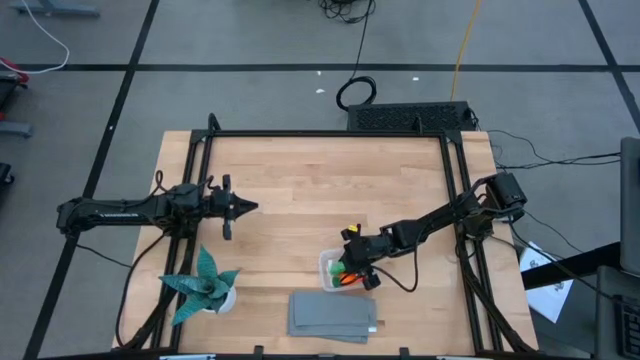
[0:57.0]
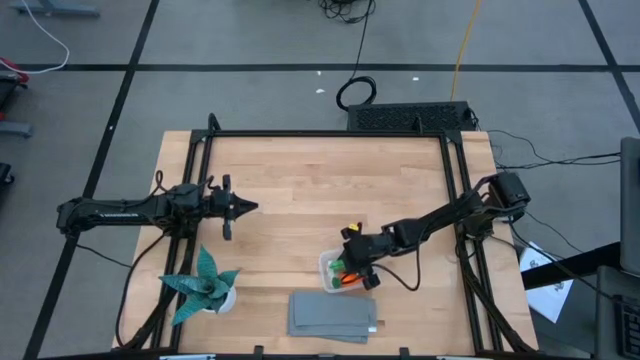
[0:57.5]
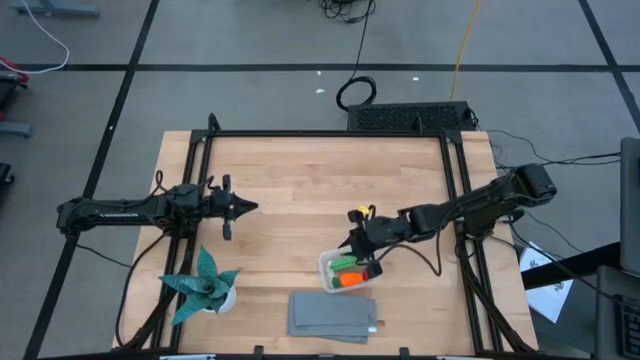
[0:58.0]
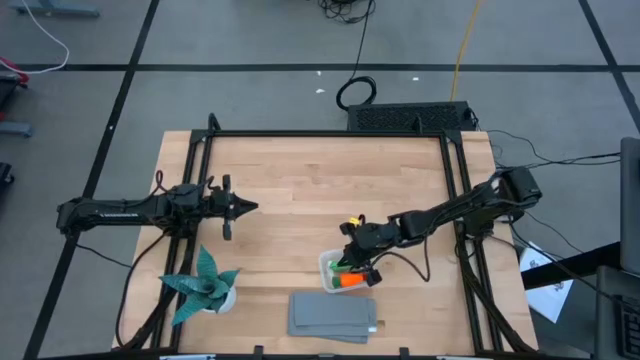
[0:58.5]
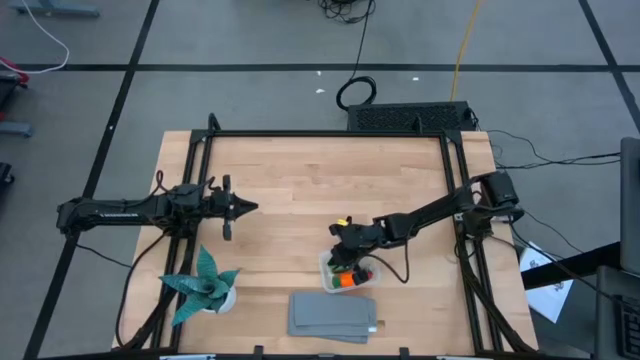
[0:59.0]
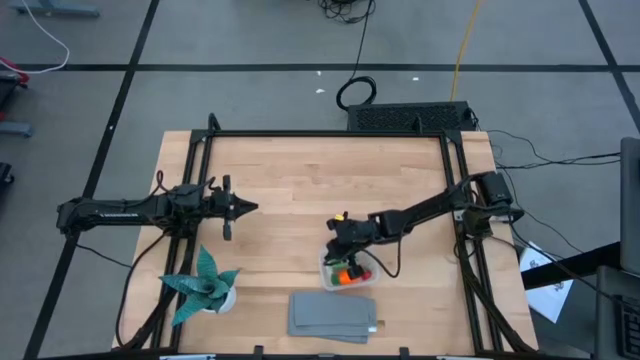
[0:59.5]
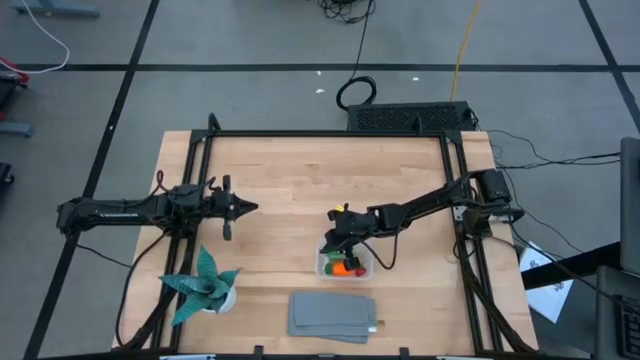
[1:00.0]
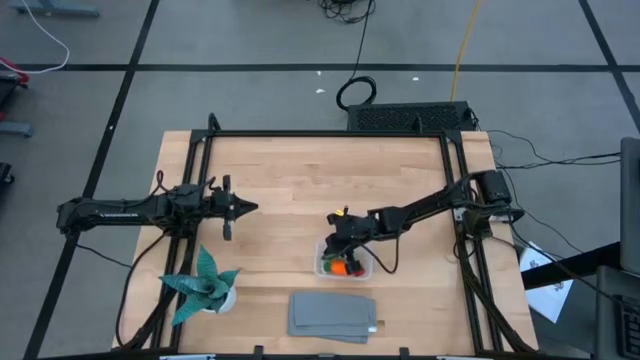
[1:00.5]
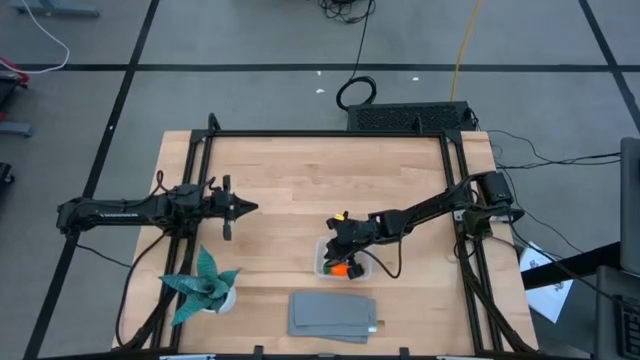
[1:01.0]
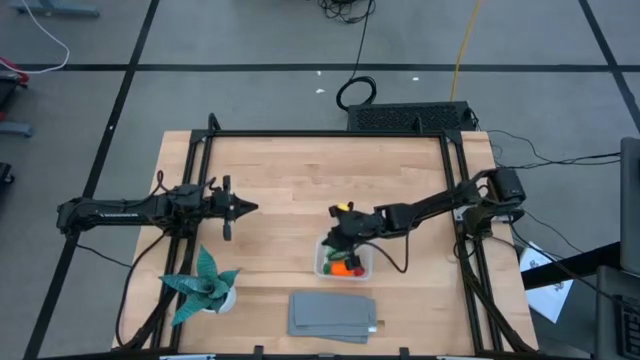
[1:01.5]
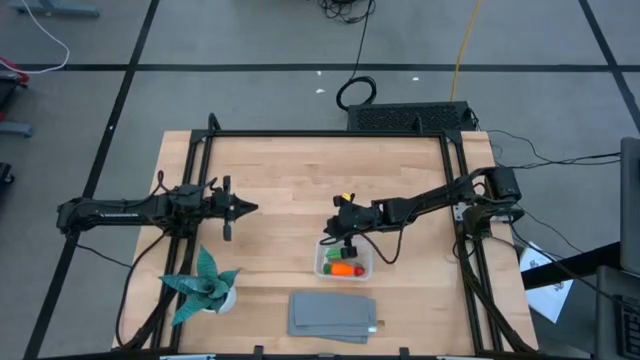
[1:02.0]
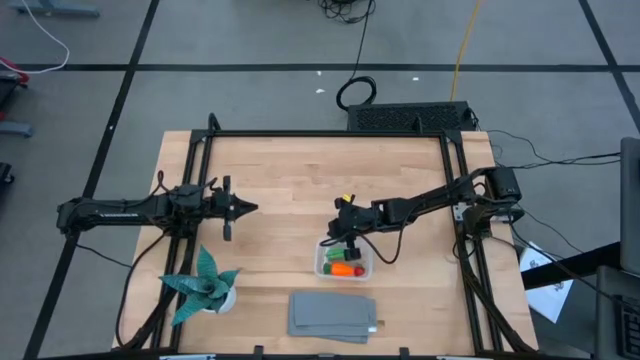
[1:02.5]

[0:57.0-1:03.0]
Task: Pick and placing Produce into tupperware
Adjust the transparent bin

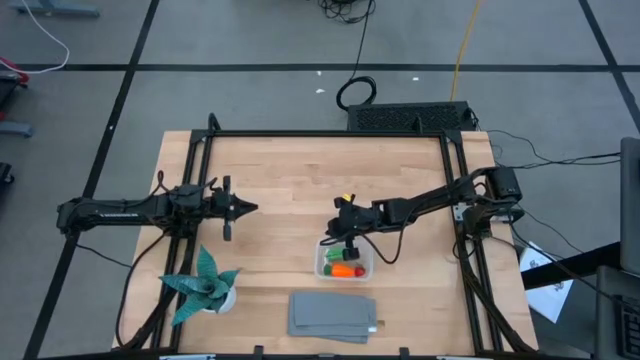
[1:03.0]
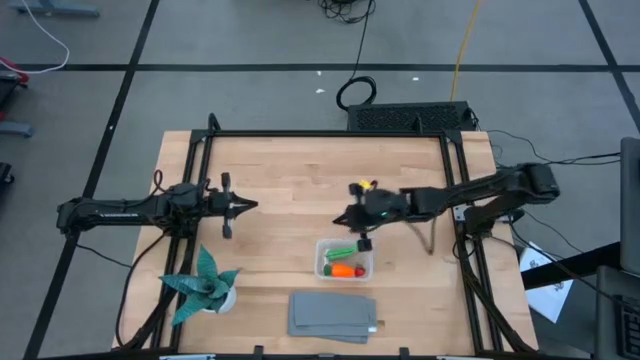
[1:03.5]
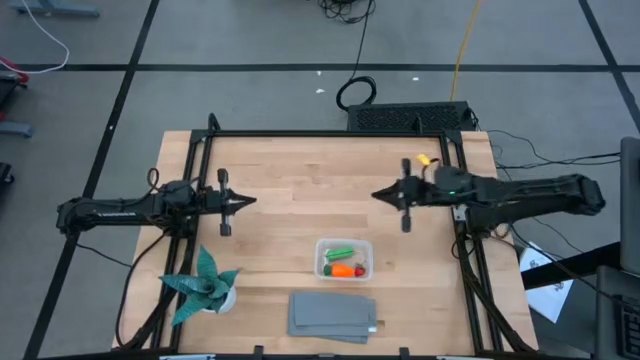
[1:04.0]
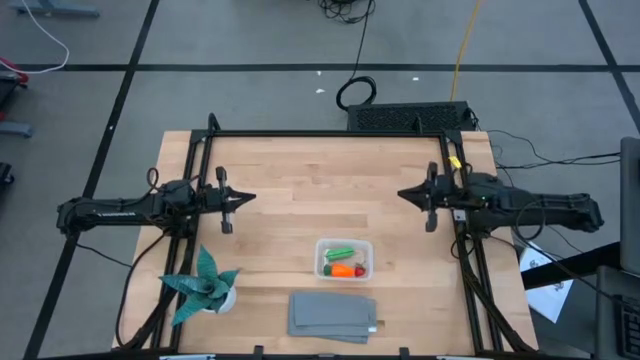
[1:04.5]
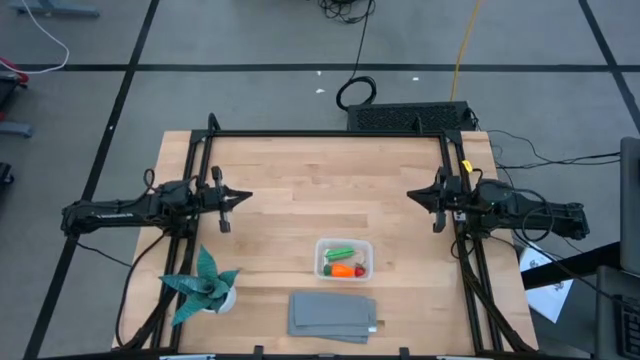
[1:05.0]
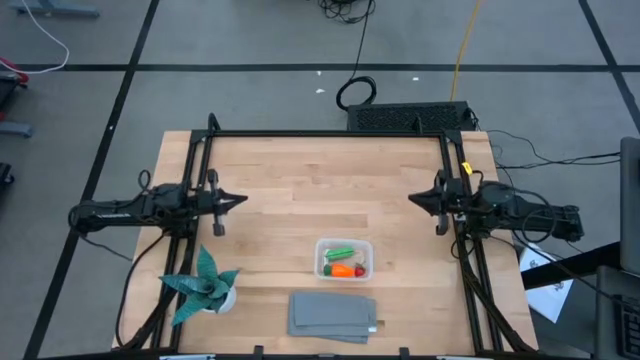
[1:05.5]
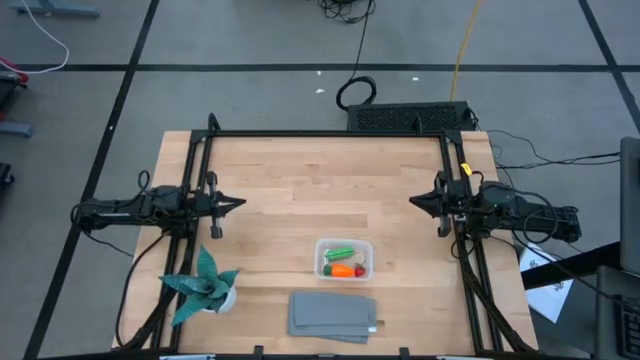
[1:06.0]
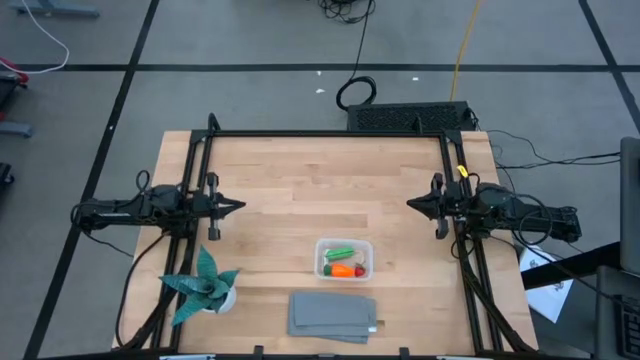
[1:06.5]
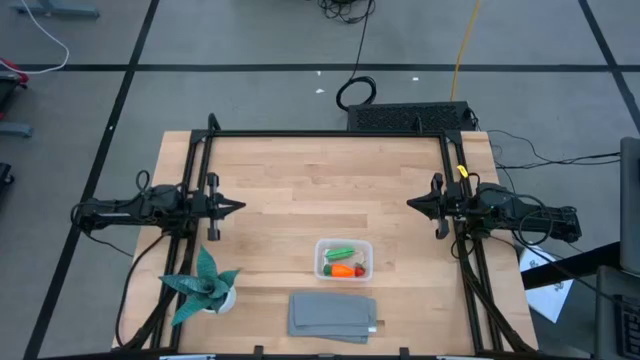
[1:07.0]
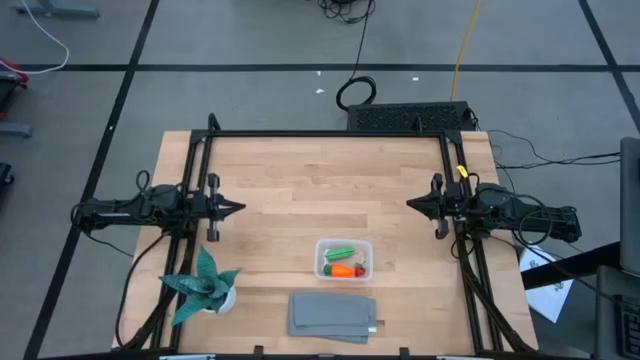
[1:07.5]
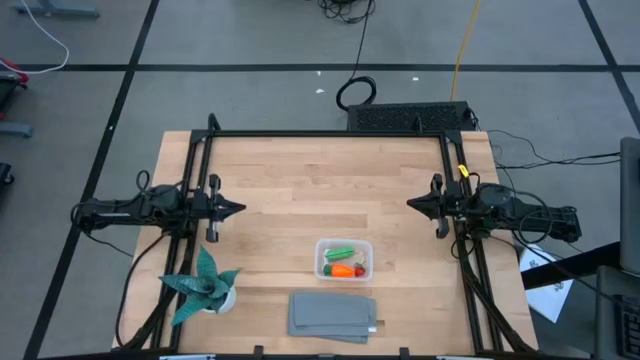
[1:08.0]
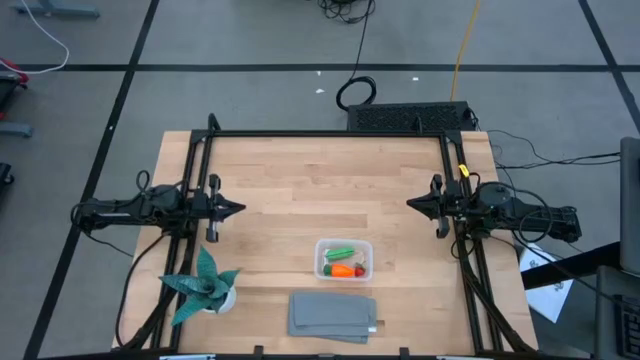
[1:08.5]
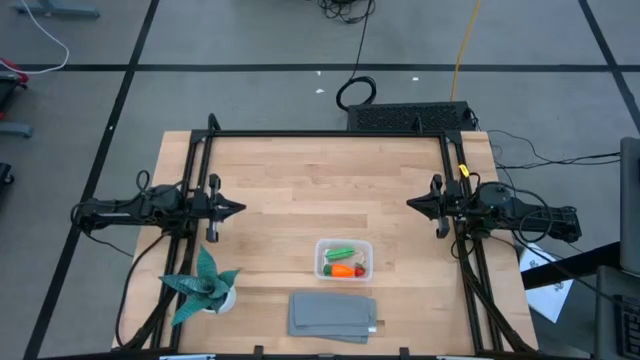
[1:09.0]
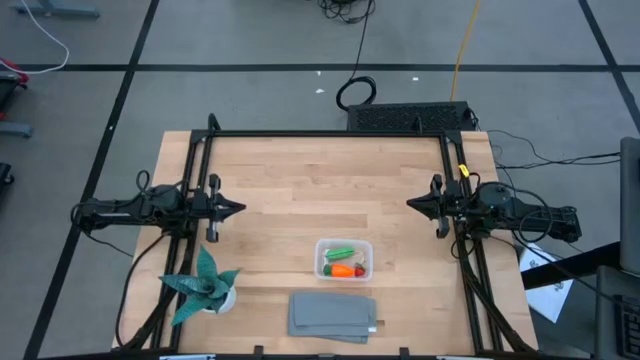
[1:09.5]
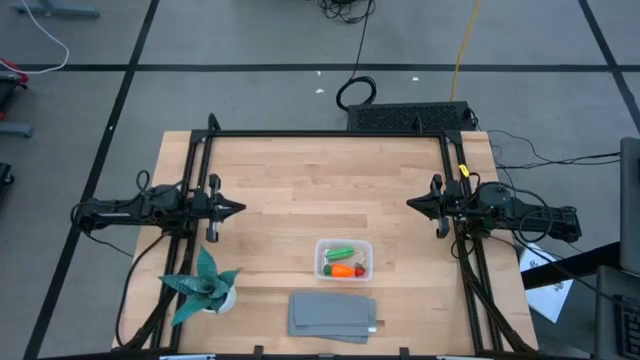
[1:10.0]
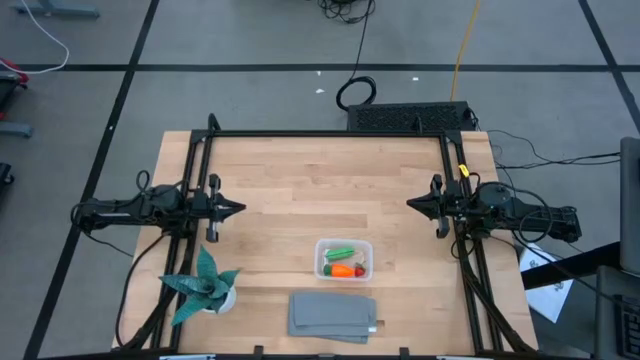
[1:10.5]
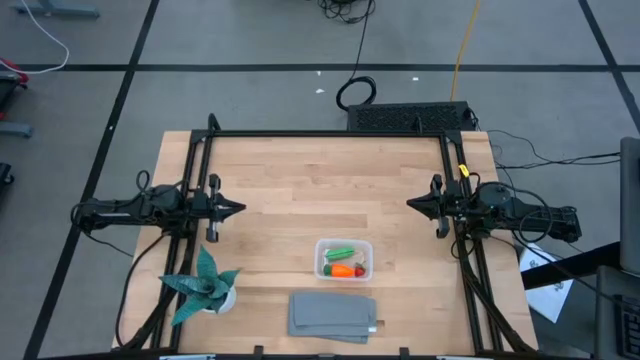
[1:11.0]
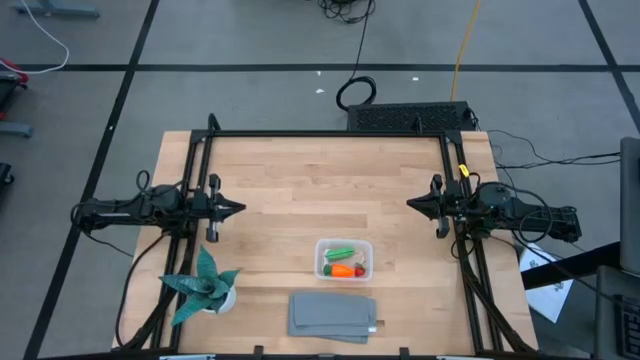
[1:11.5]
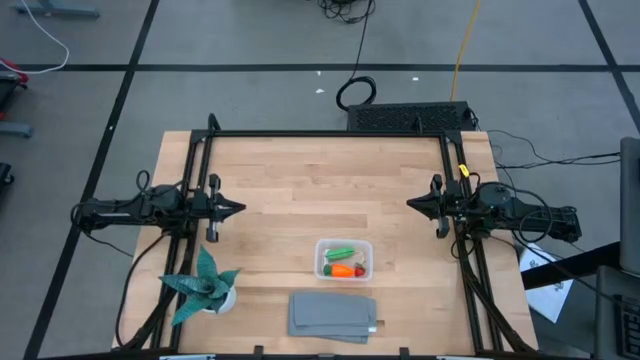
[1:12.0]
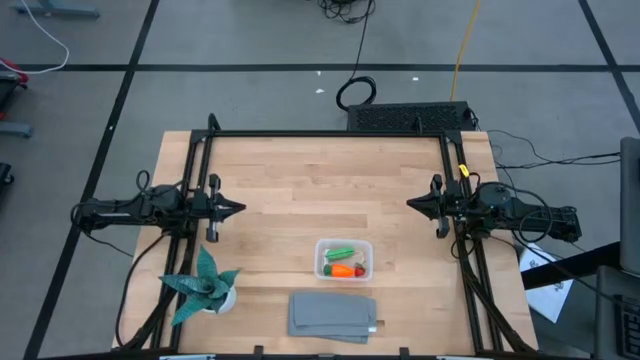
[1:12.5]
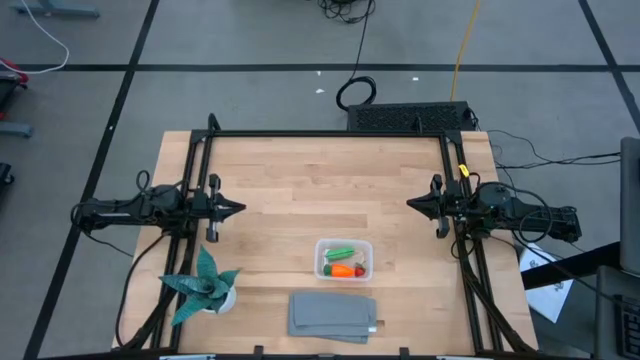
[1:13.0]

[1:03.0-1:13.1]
Return to Home Position

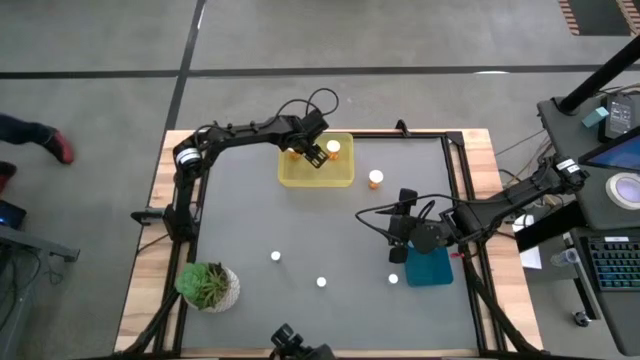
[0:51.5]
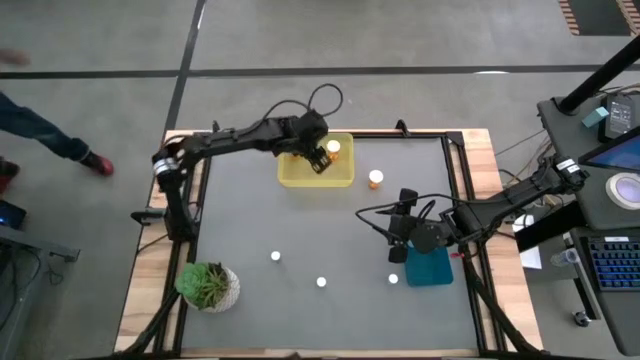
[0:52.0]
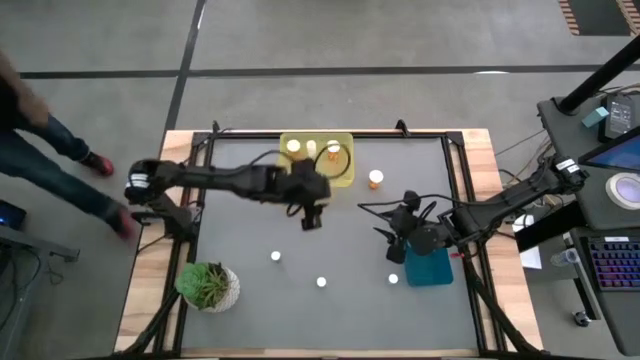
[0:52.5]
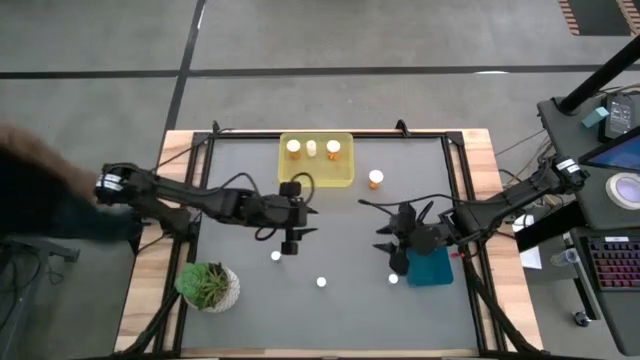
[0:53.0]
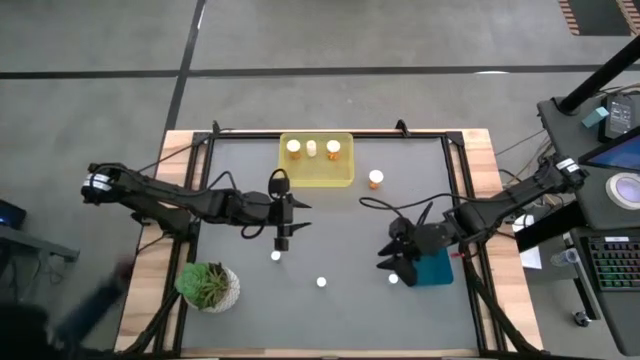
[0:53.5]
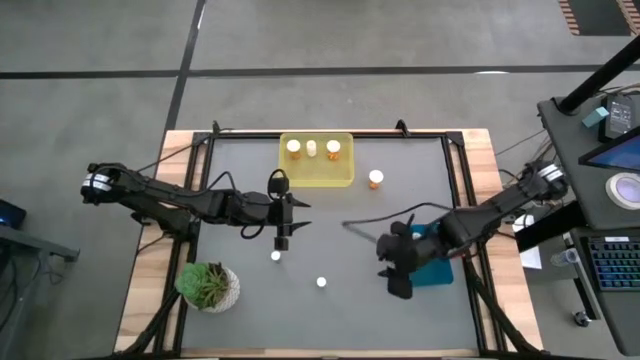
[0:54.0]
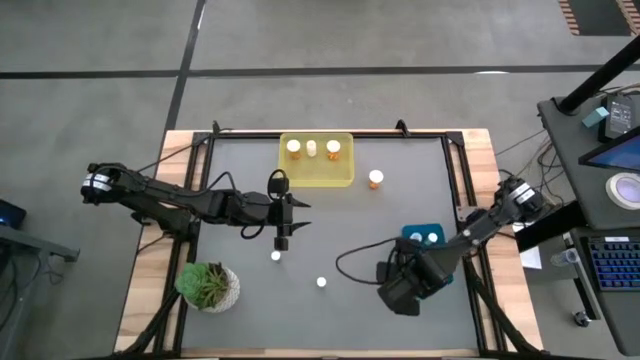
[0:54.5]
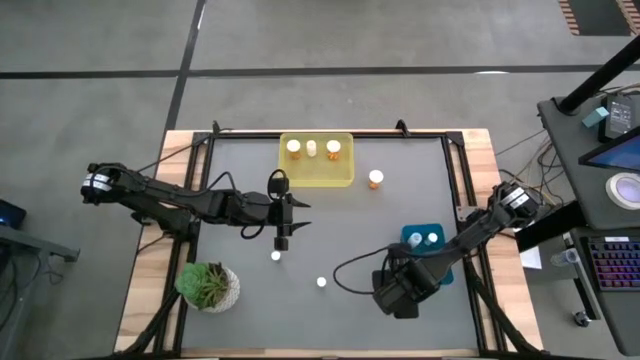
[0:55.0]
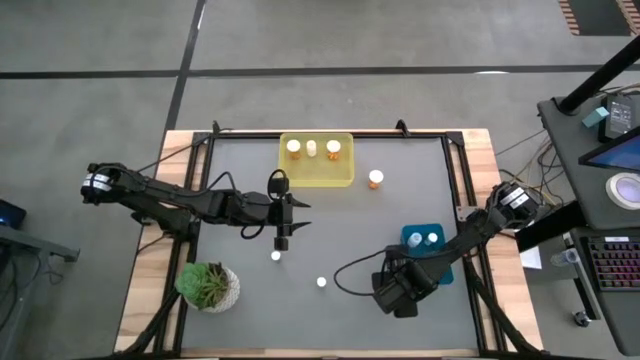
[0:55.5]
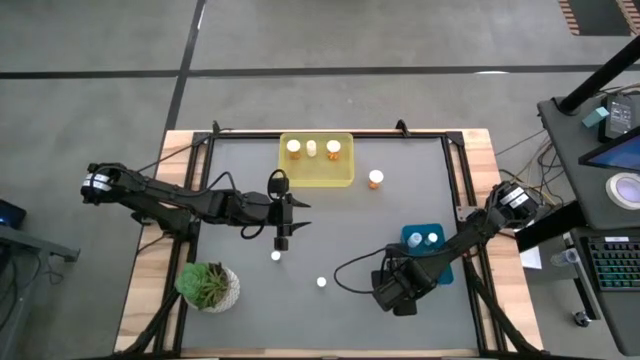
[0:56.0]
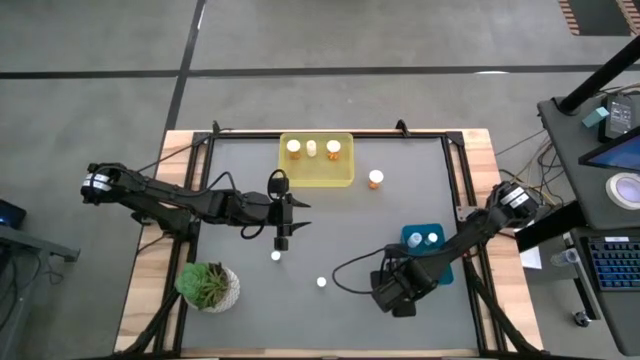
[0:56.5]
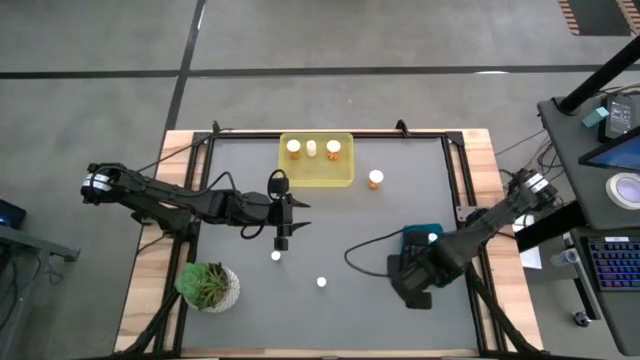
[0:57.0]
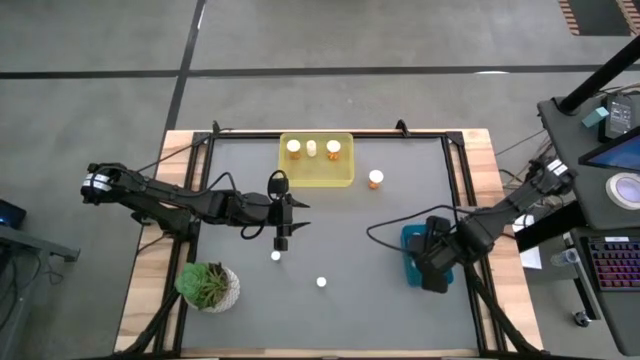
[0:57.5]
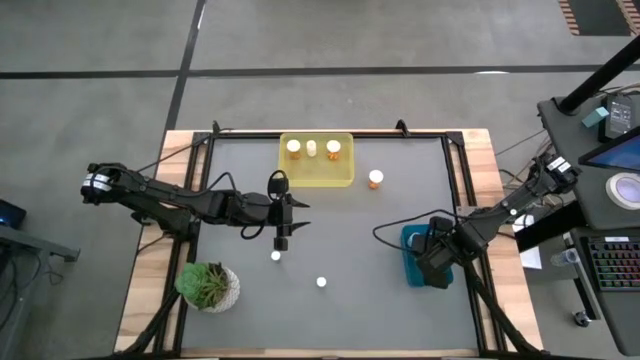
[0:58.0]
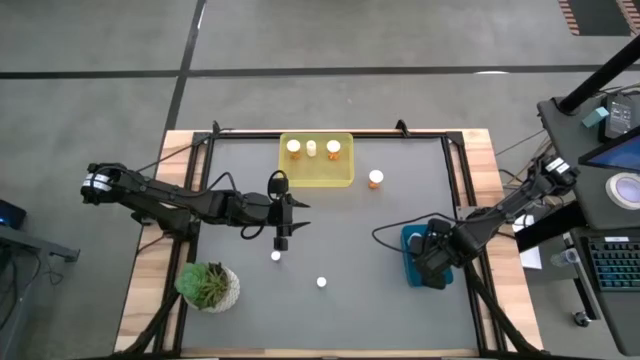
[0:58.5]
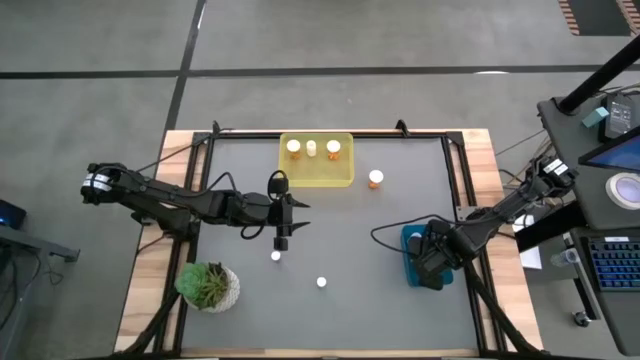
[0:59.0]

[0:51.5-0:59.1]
Task: Pick and place medicine bottles into bin by pill shape (circle, oval)
Put the blue pill bottle into the blue bin
